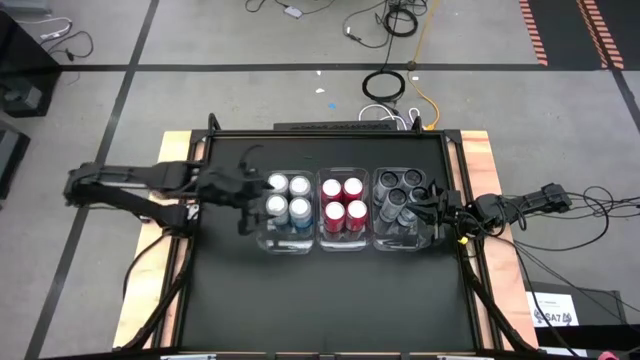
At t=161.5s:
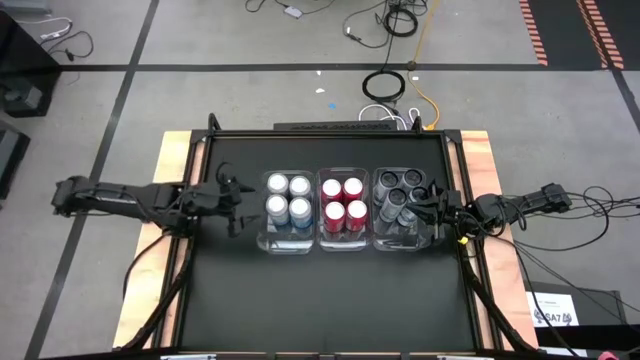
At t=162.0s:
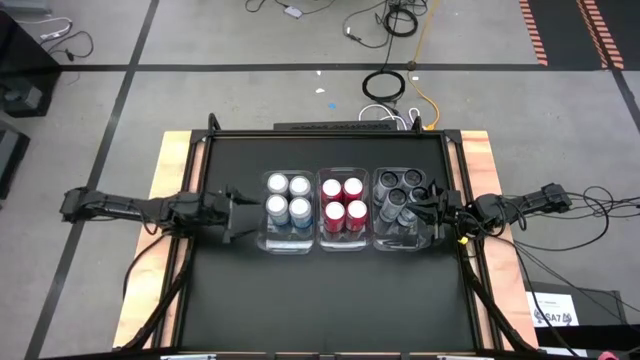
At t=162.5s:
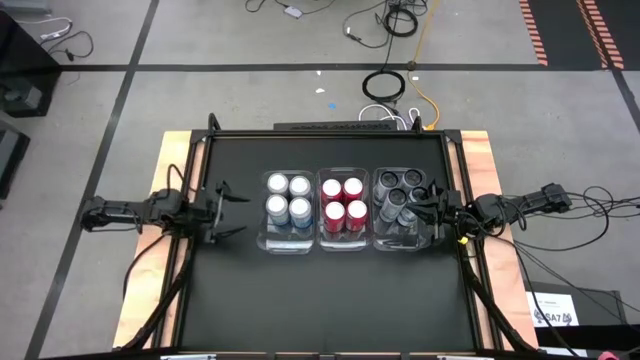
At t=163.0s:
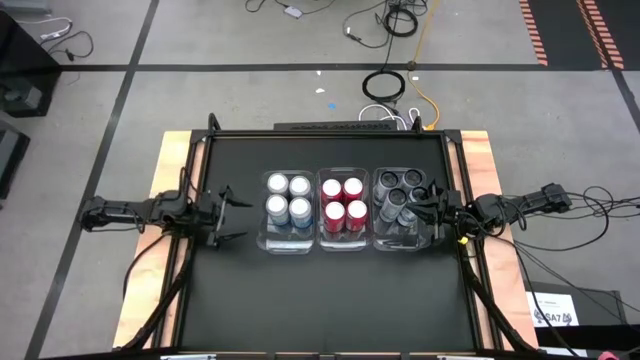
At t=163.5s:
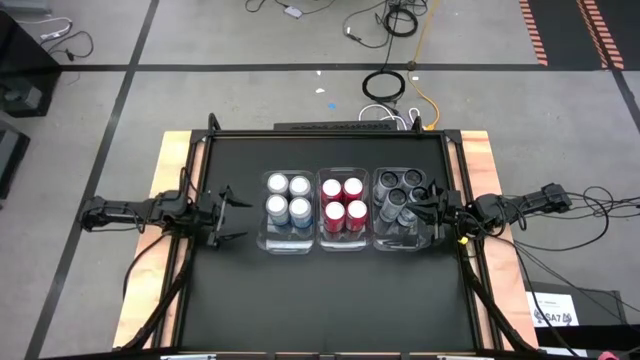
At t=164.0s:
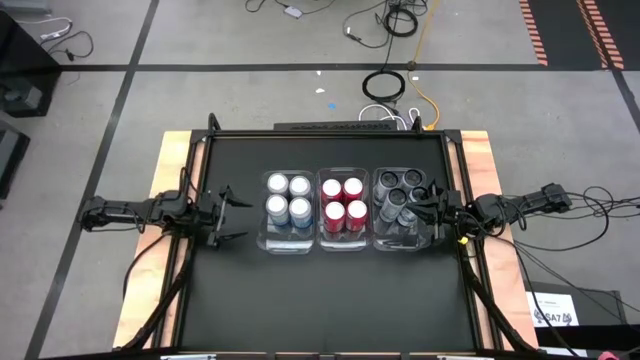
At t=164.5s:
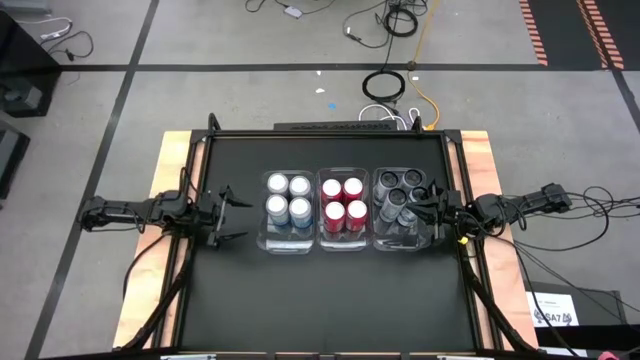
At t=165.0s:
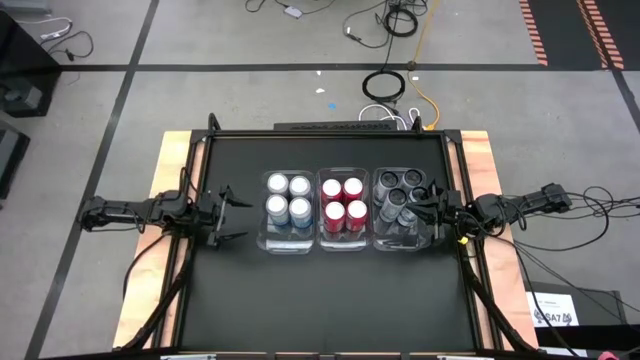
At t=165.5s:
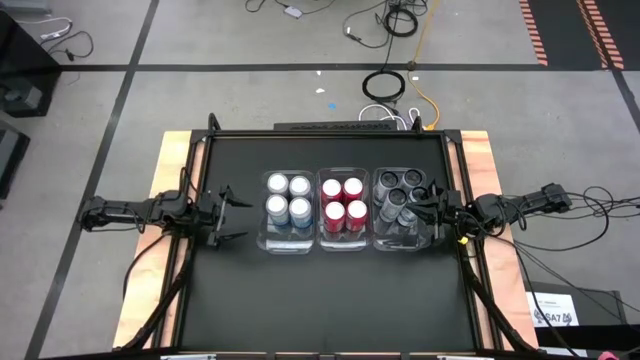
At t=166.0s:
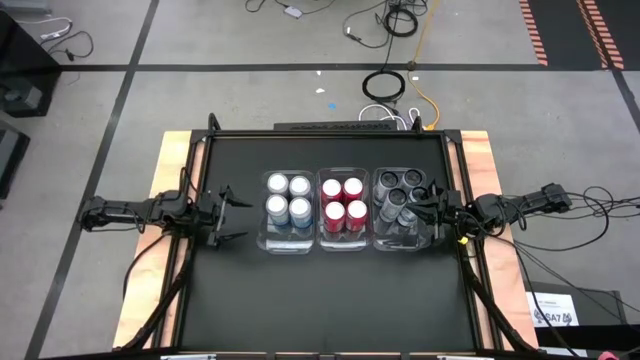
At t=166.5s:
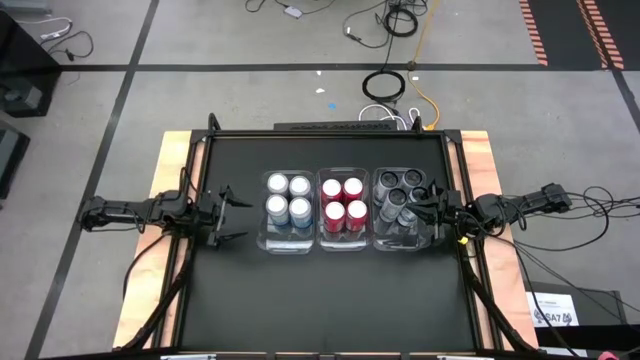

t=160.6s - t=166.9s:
Task: Sort soda cans
Return to Home Position

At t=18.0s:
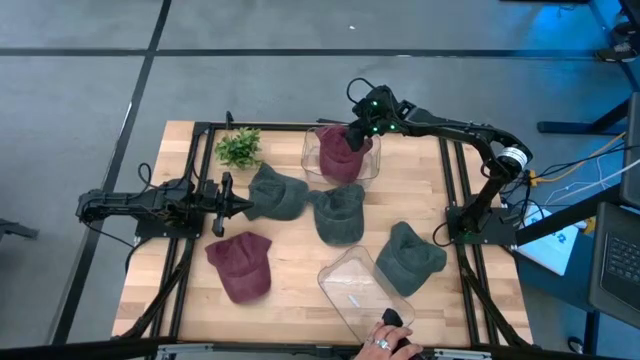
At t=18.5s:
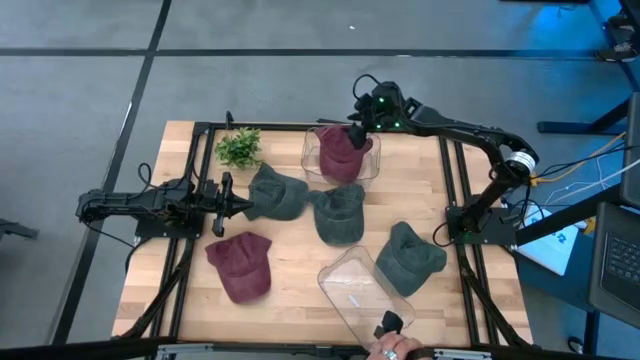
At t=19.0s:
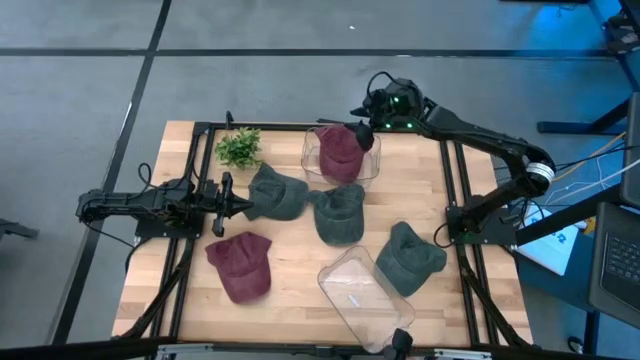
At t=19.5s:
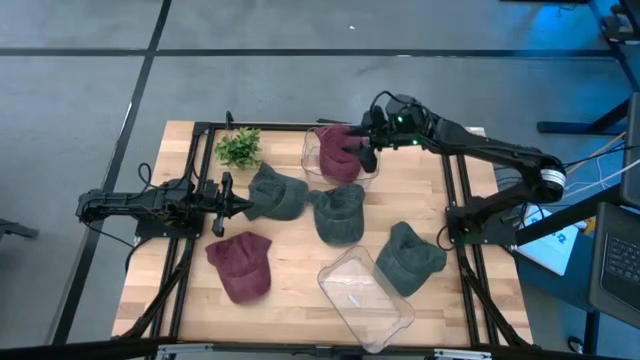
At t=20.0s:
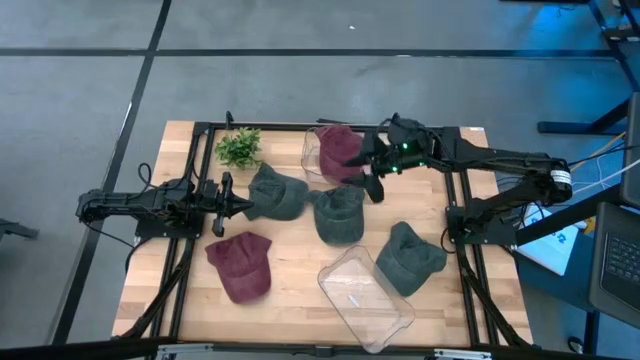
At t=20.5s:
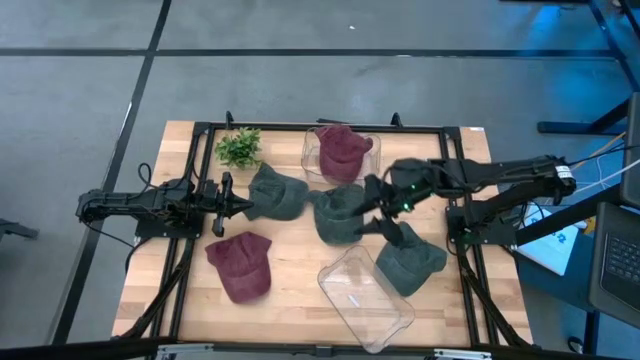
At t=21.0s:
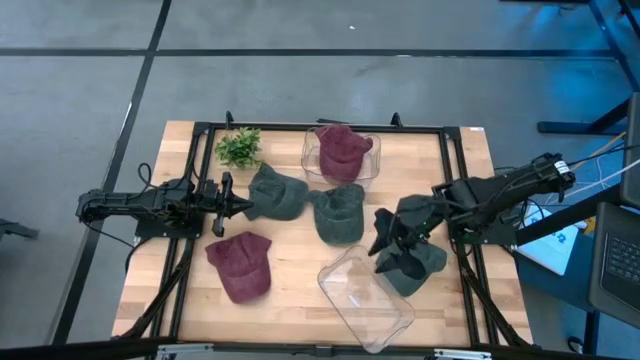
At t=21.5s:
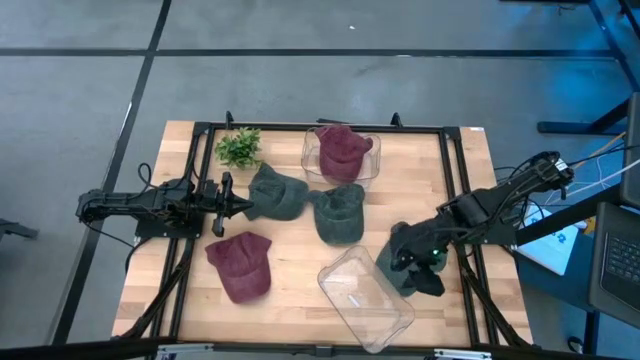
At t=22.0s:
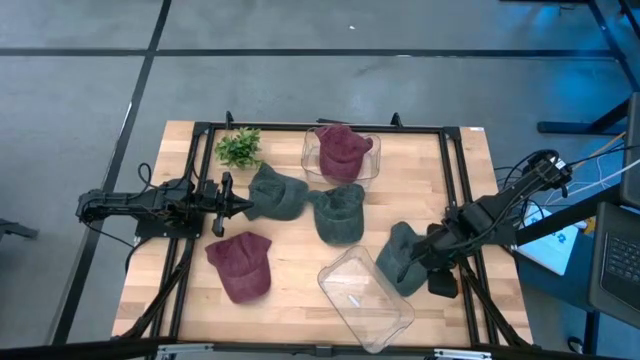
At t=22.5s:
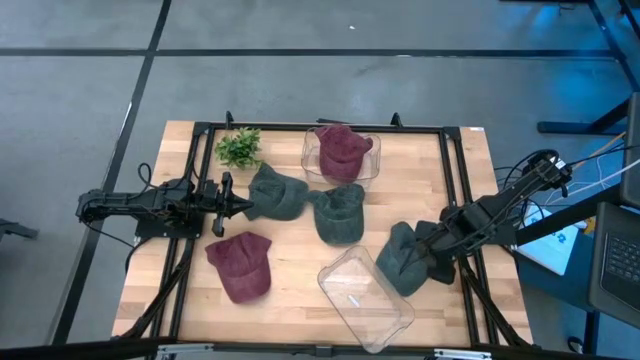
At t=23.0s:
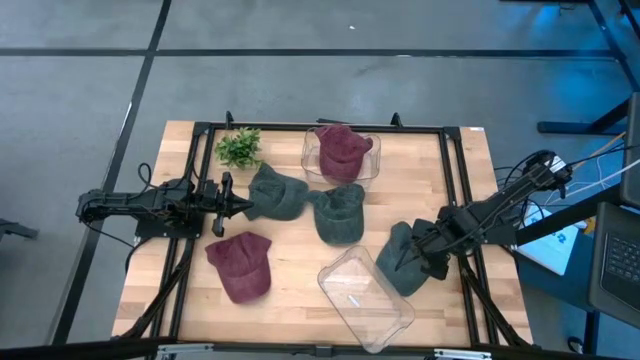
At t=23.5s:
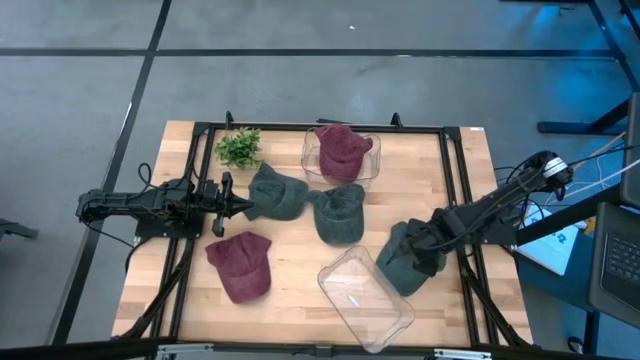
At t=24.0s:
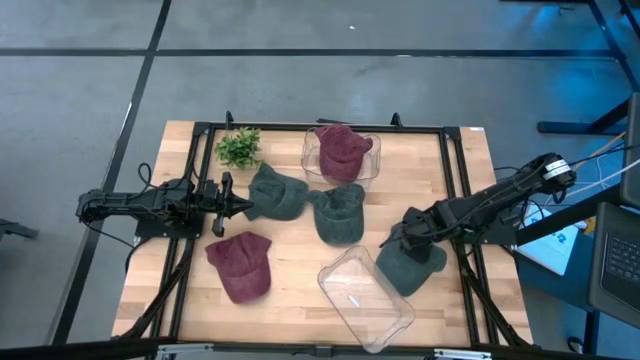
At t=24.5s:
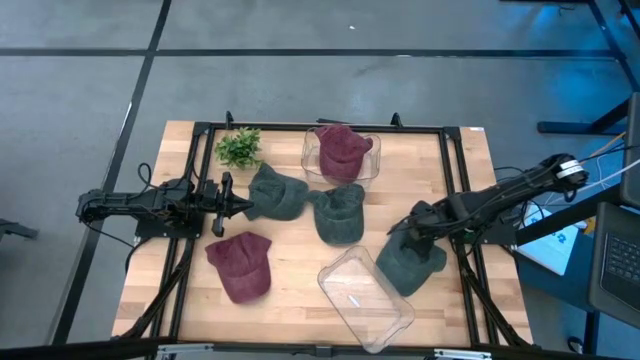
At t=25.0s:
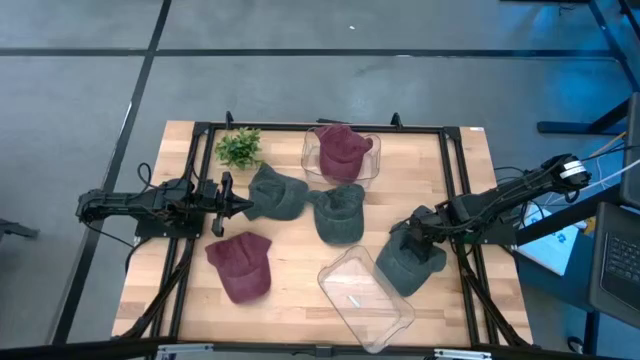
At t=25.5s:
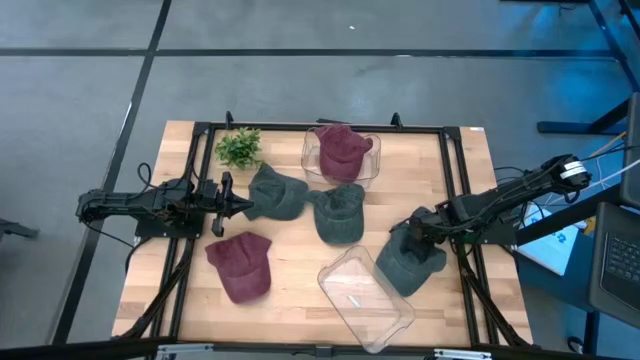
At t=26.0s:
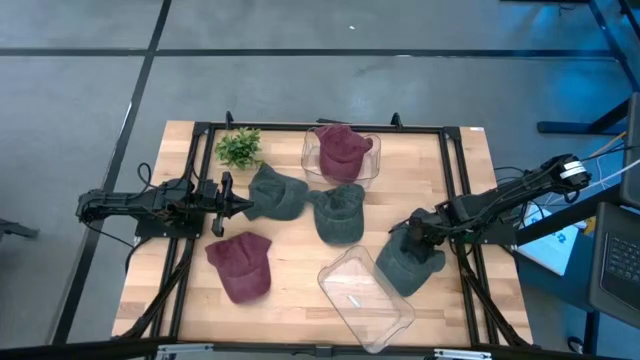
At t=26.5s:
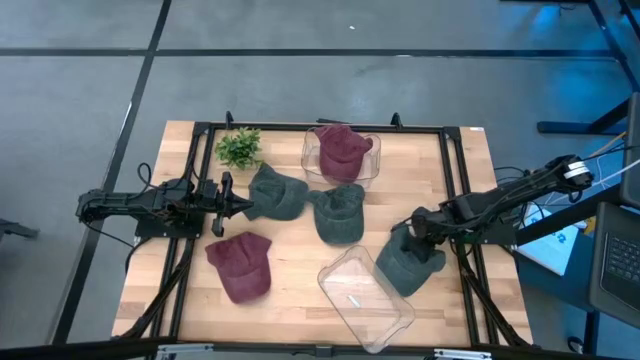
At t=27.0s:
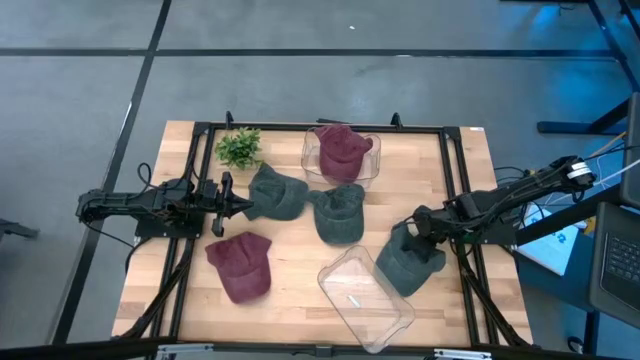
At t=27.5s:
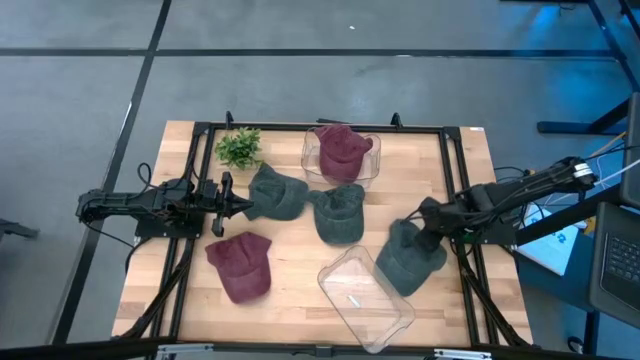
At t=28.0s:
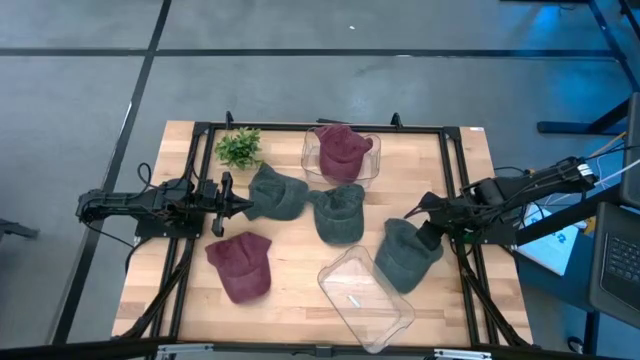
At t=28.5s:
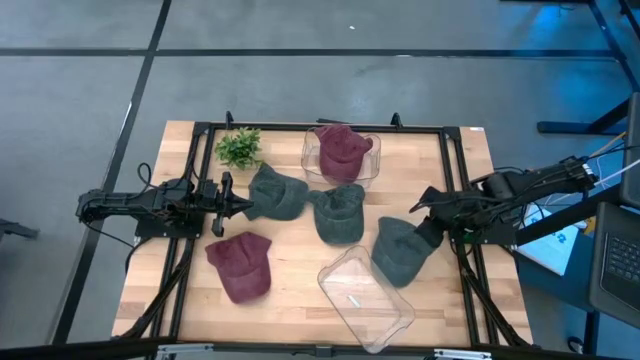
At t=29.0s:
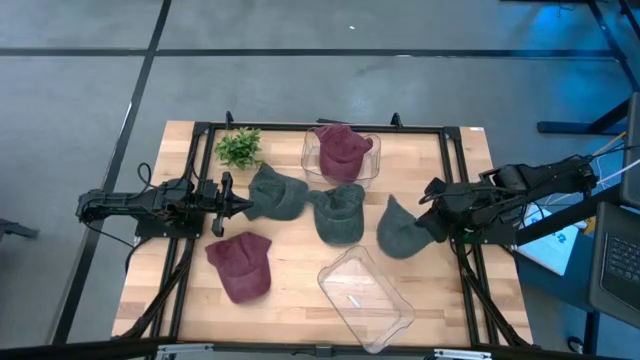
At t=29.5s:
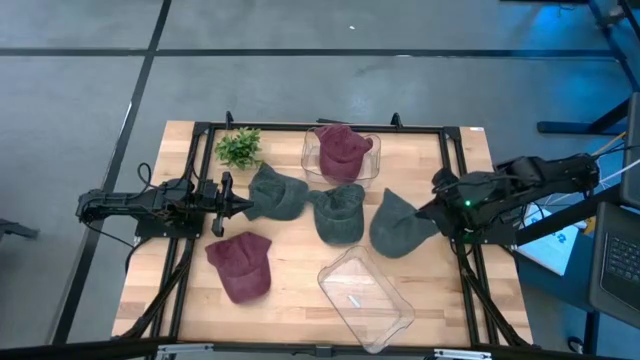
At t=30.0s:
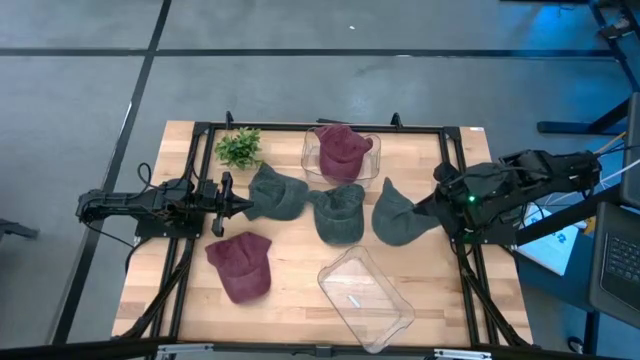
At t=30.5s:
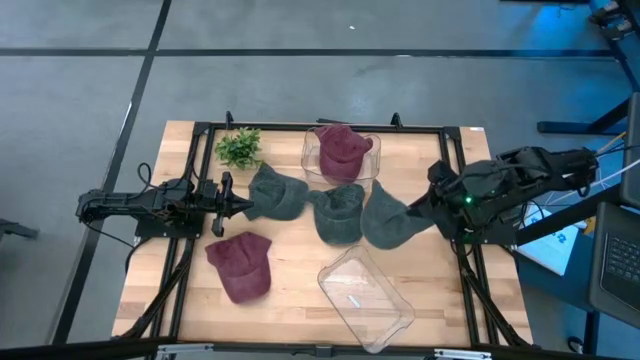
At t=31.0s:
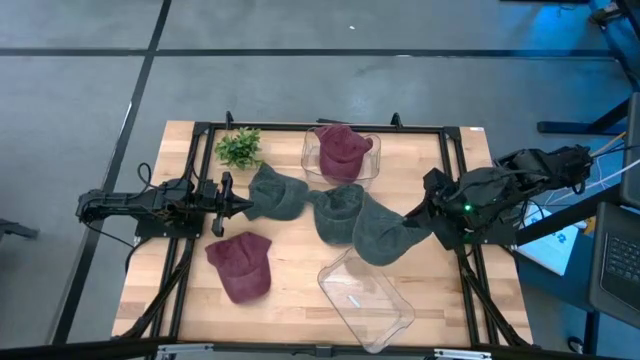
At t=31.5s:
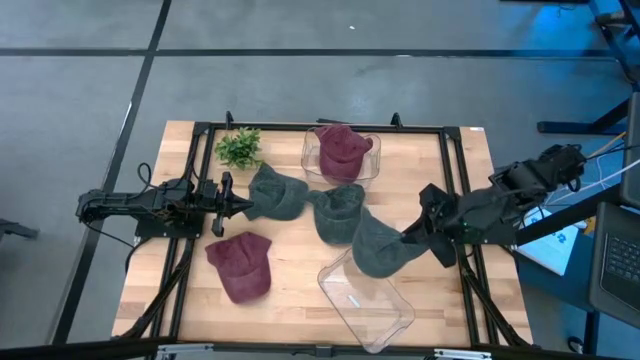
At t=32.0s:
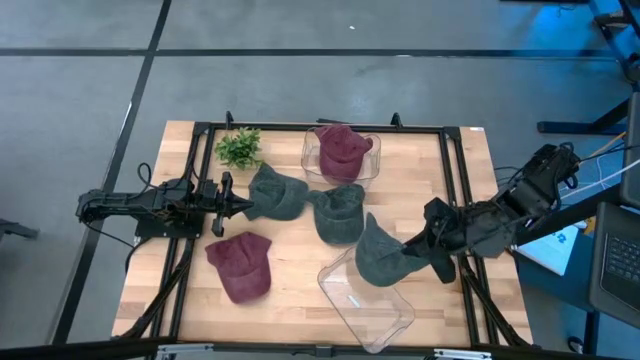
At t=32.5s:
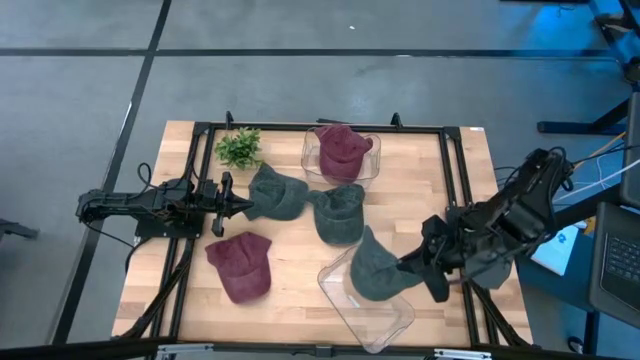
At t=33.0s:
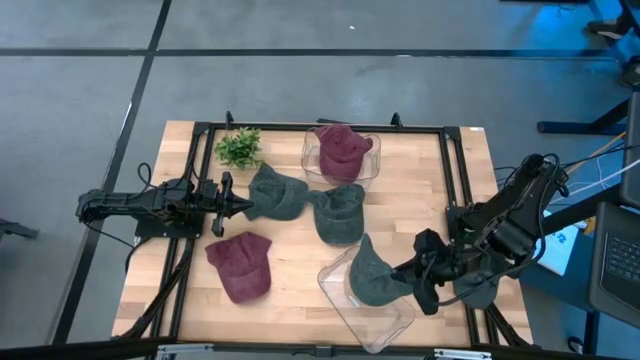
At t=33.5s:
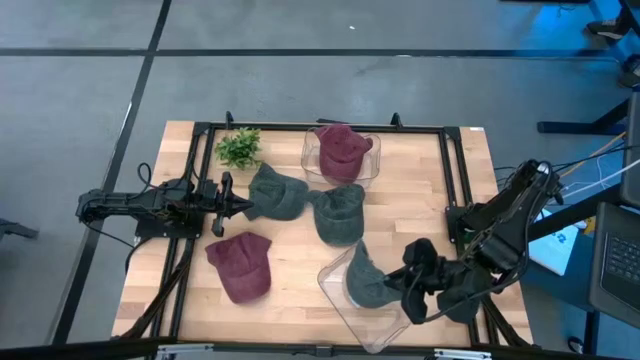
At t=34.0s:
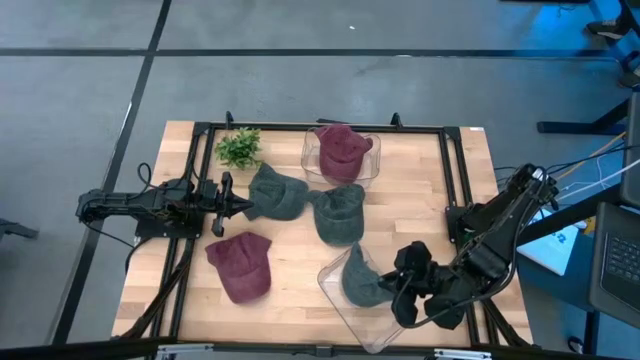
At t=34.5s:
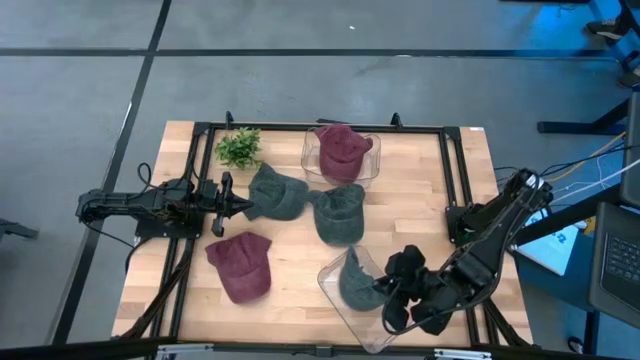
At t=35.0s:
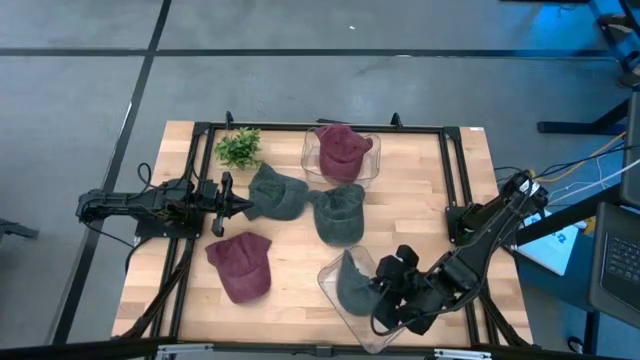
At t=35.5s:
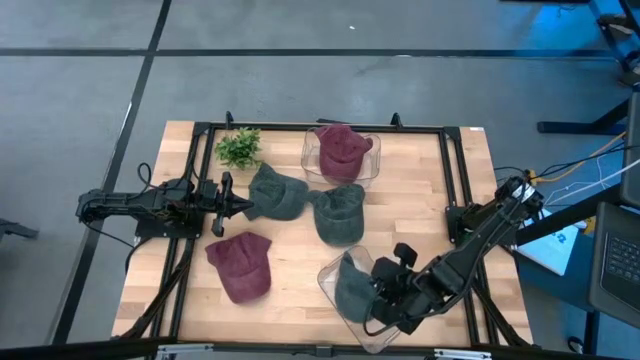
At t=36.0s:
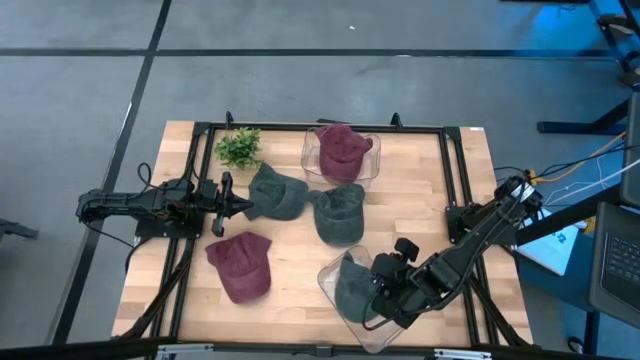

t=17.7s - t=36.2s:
Task: Pick & Place hat
Put the right black cap into the bottom transparent bin
